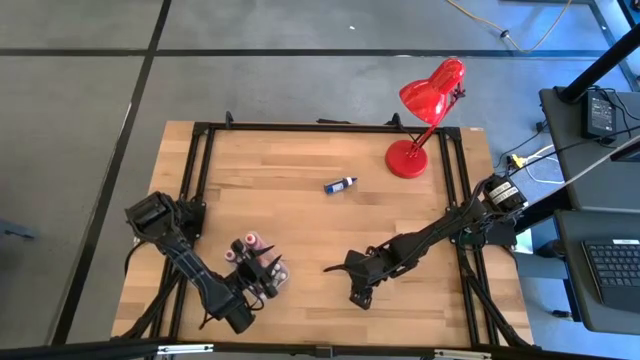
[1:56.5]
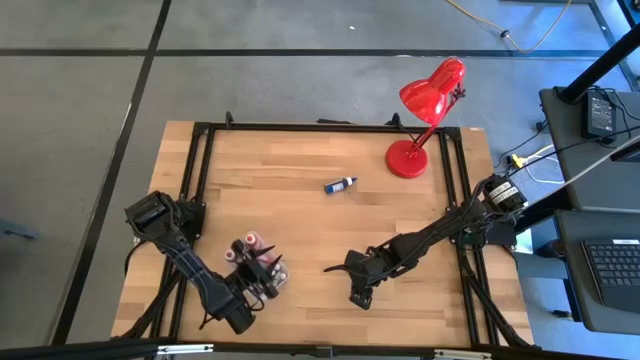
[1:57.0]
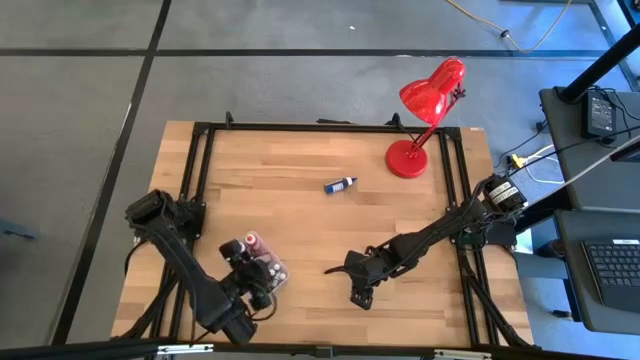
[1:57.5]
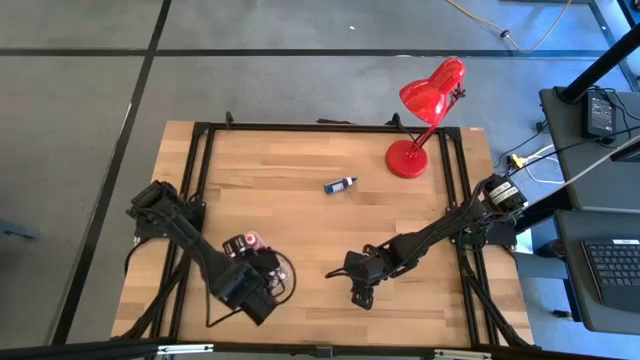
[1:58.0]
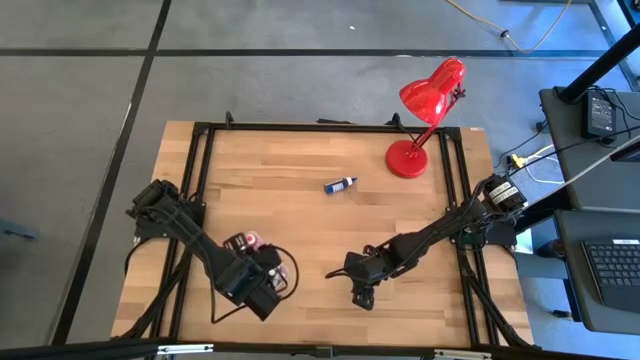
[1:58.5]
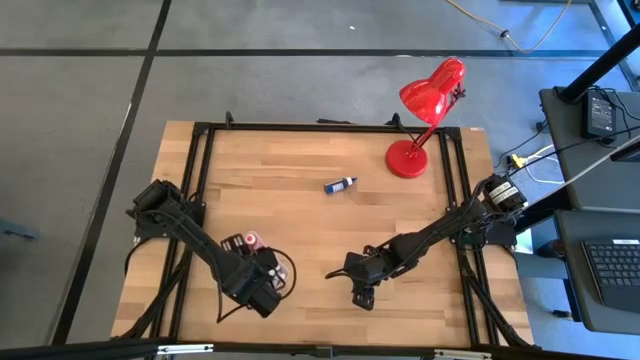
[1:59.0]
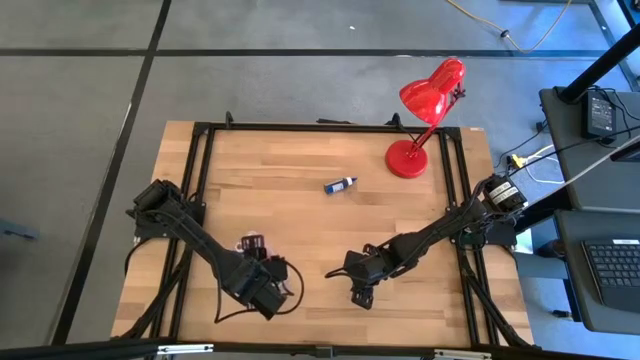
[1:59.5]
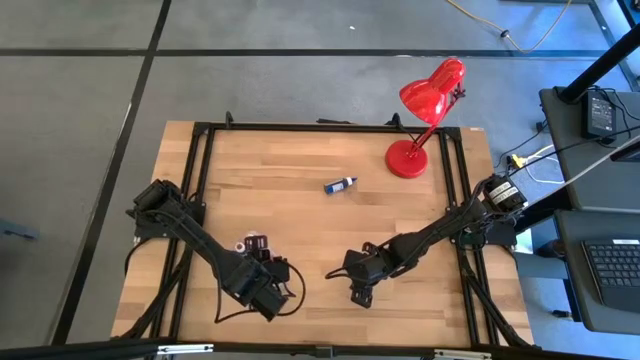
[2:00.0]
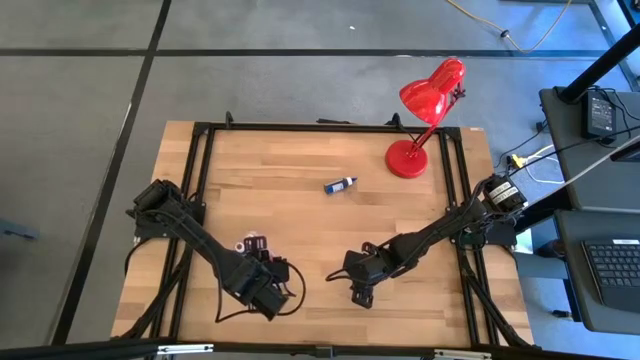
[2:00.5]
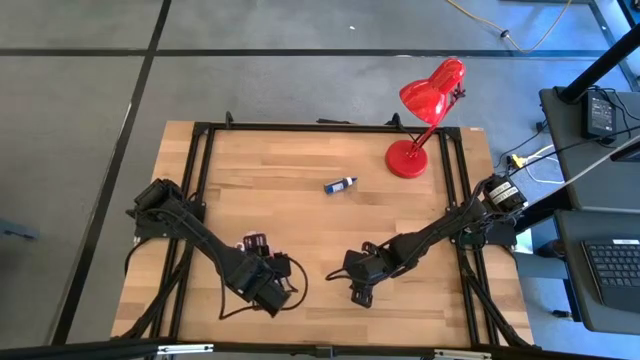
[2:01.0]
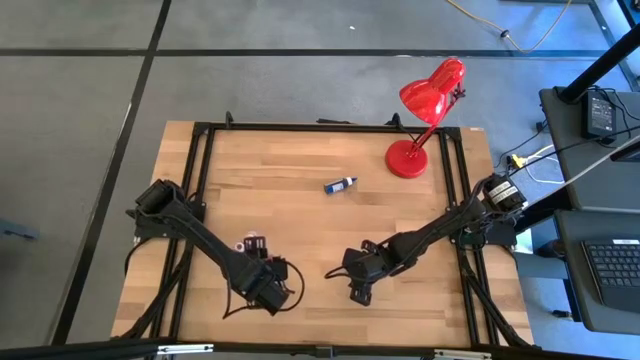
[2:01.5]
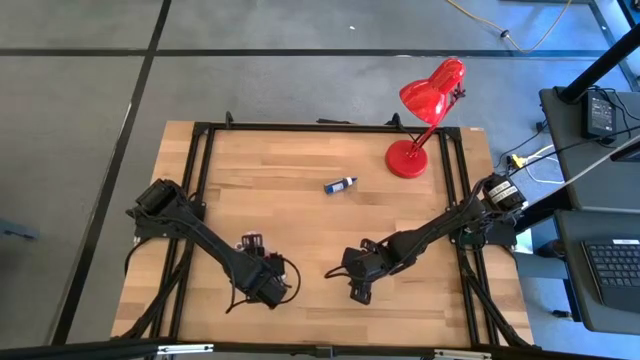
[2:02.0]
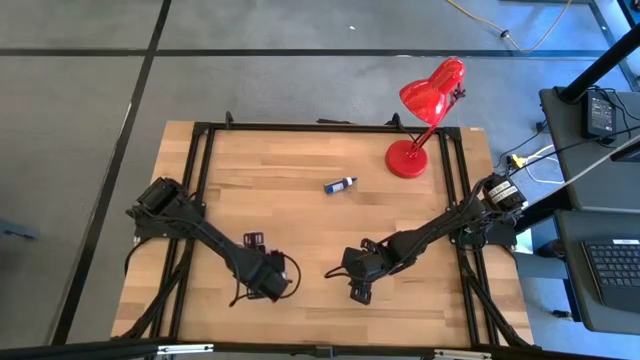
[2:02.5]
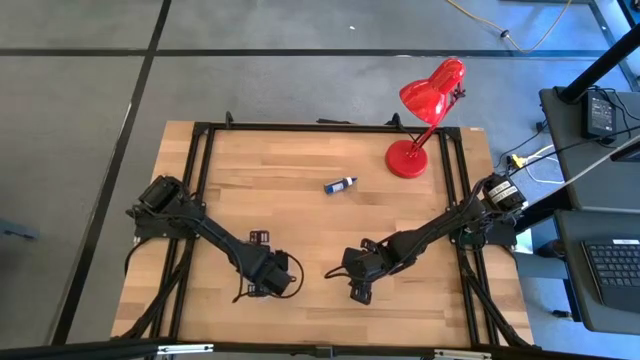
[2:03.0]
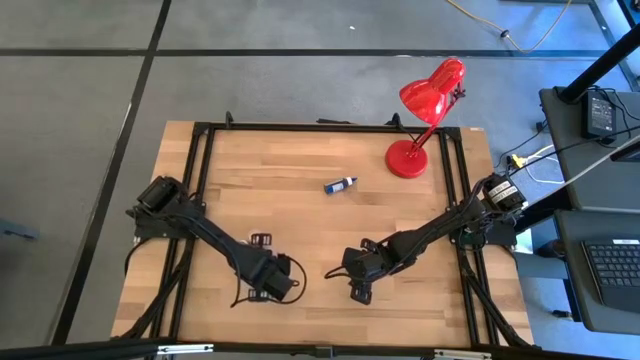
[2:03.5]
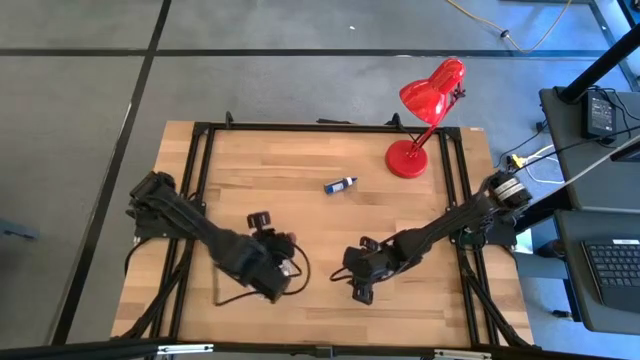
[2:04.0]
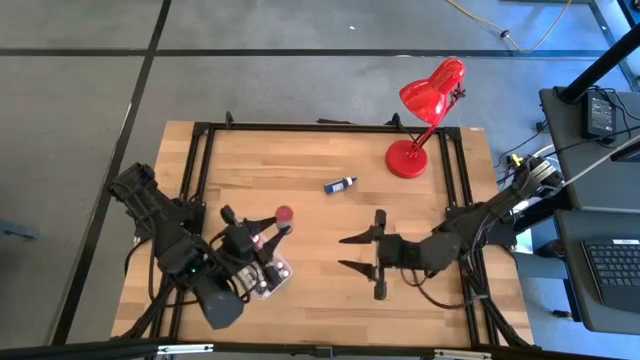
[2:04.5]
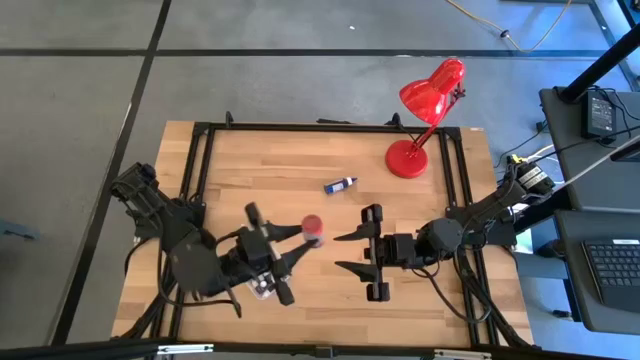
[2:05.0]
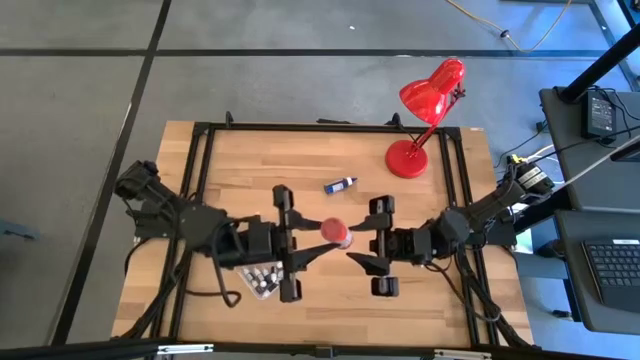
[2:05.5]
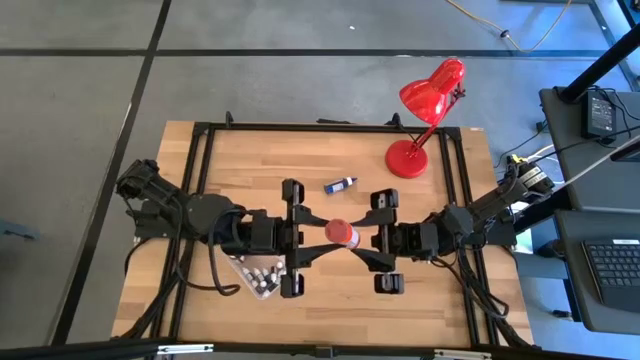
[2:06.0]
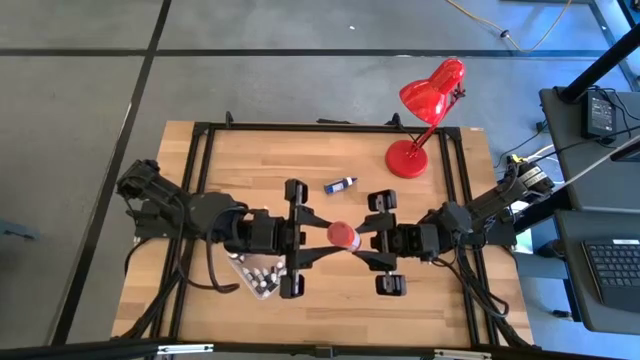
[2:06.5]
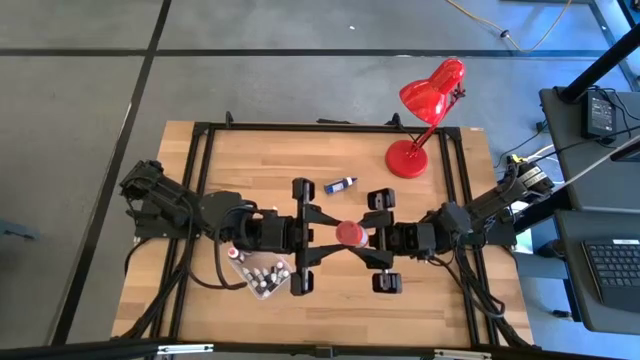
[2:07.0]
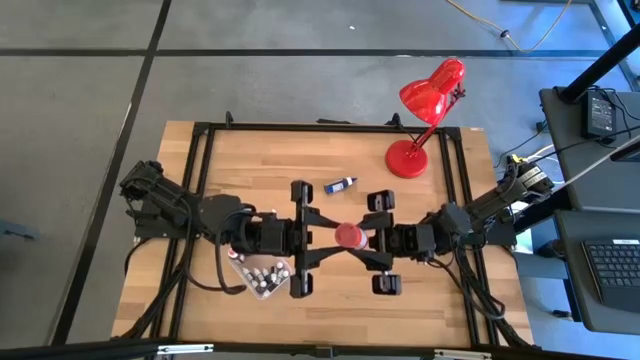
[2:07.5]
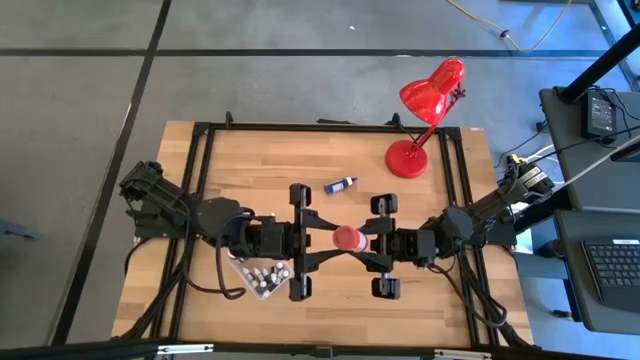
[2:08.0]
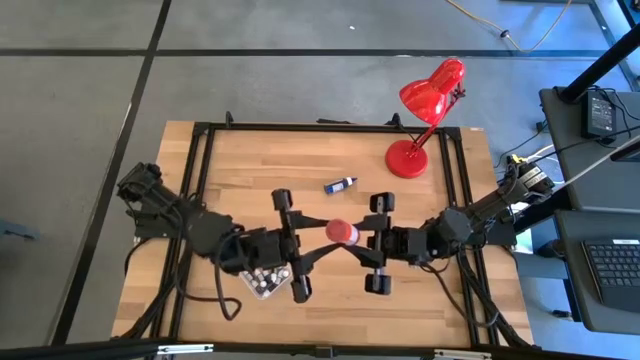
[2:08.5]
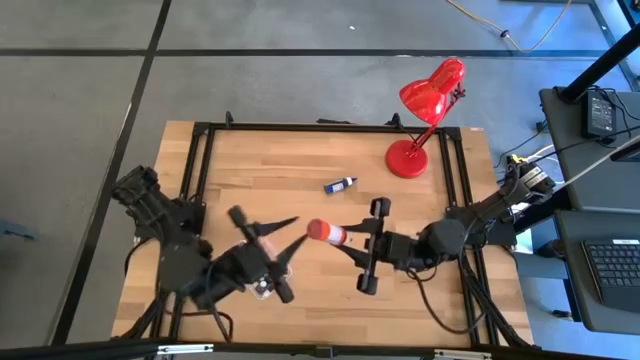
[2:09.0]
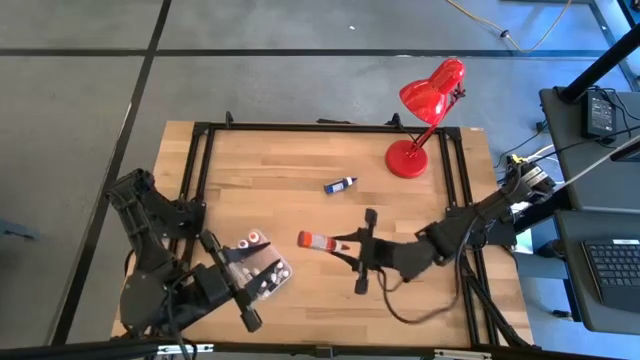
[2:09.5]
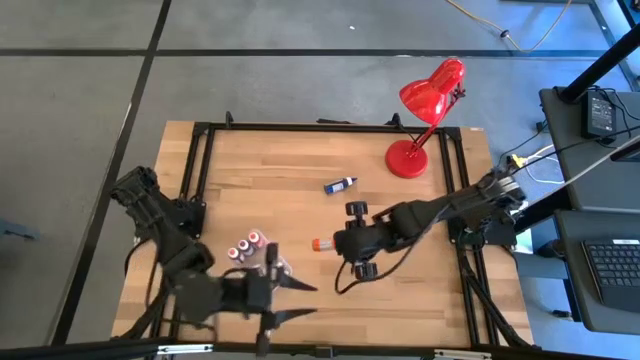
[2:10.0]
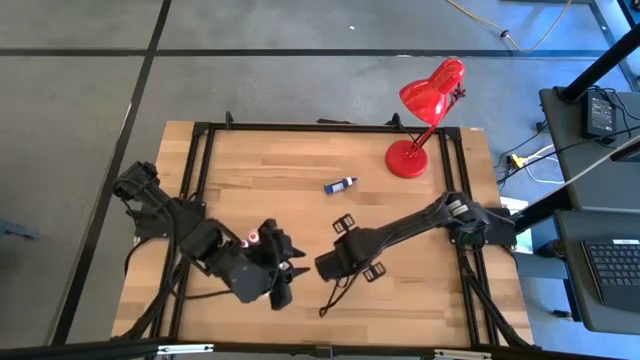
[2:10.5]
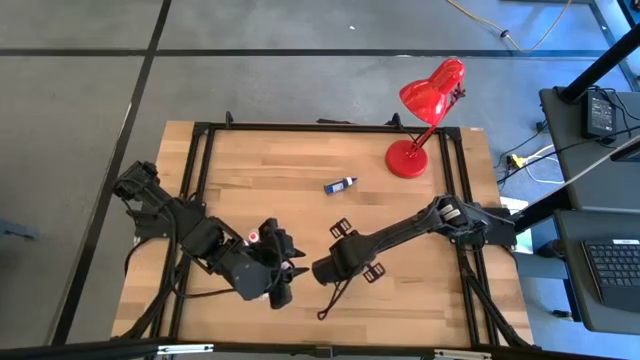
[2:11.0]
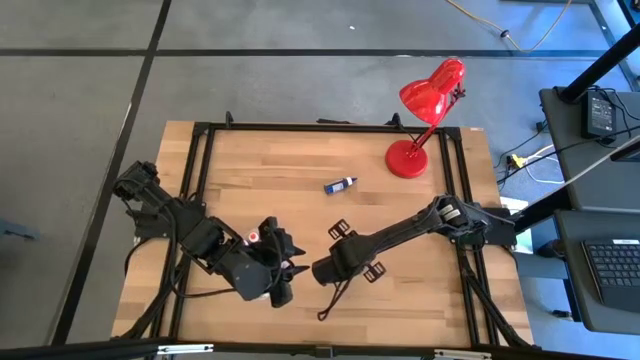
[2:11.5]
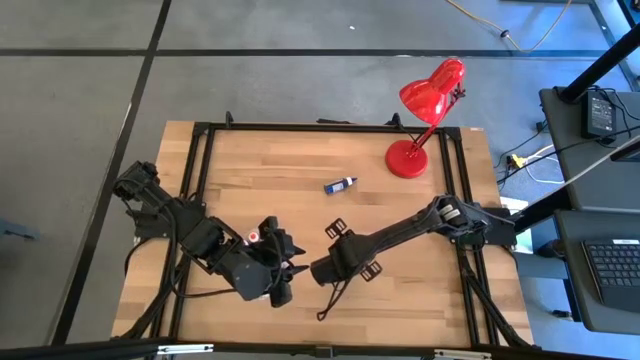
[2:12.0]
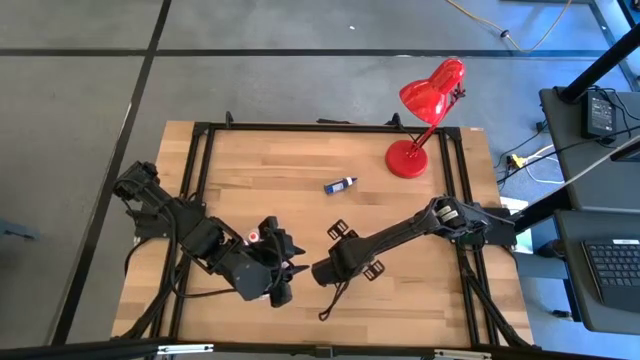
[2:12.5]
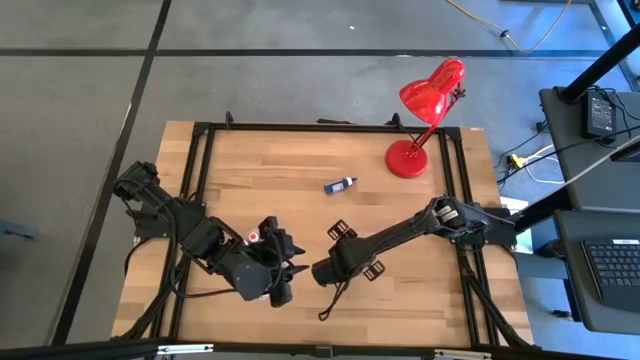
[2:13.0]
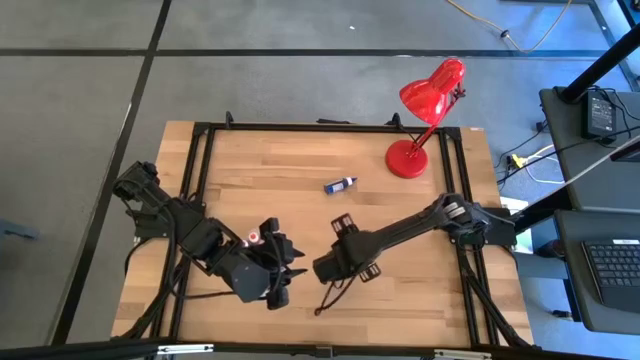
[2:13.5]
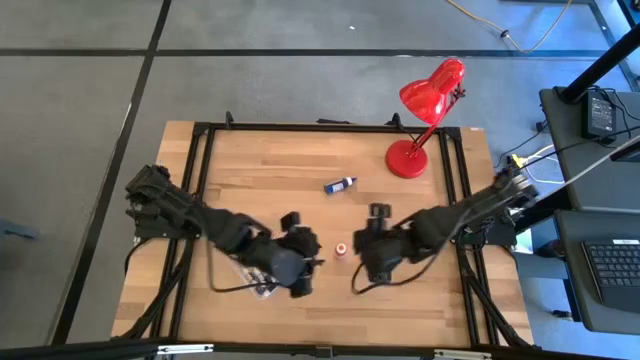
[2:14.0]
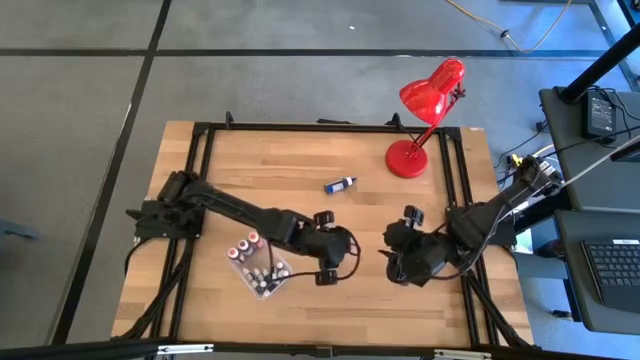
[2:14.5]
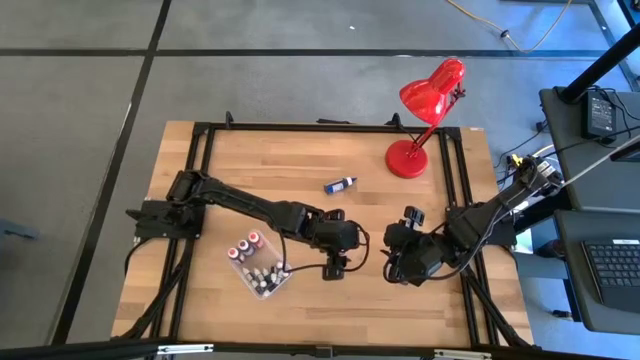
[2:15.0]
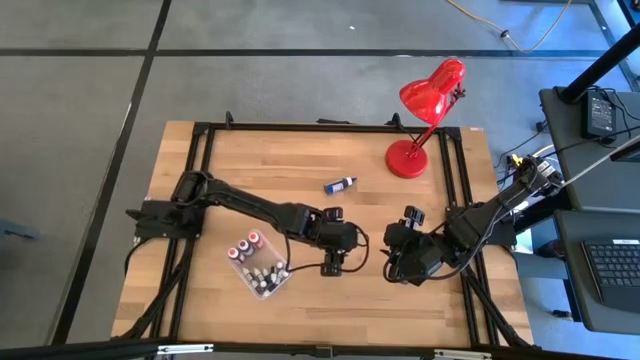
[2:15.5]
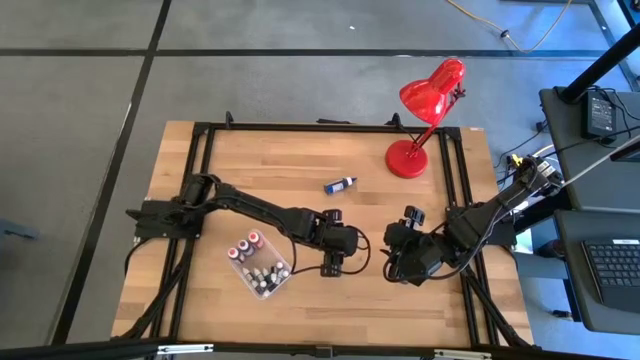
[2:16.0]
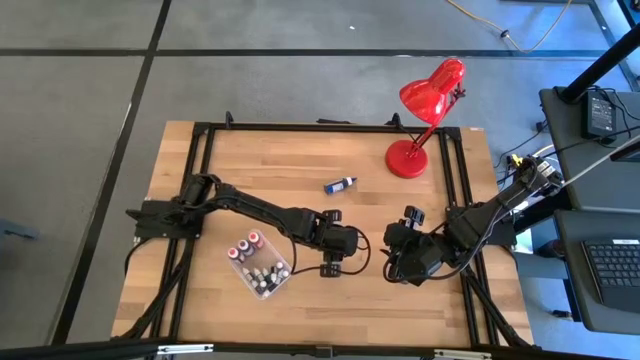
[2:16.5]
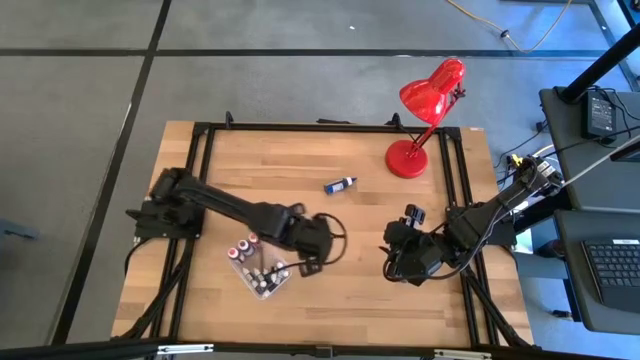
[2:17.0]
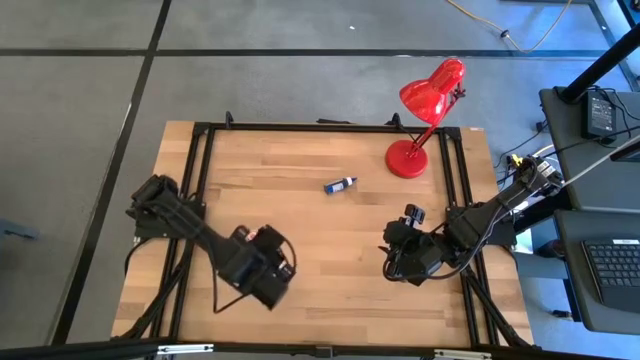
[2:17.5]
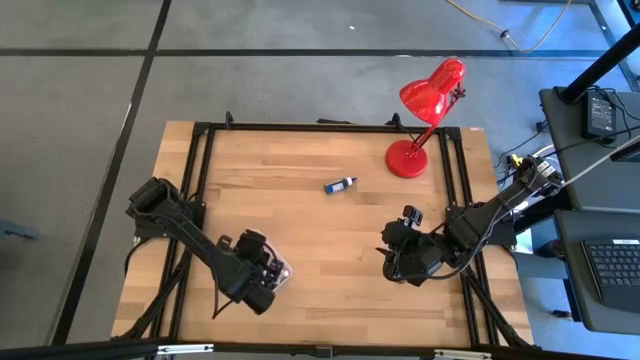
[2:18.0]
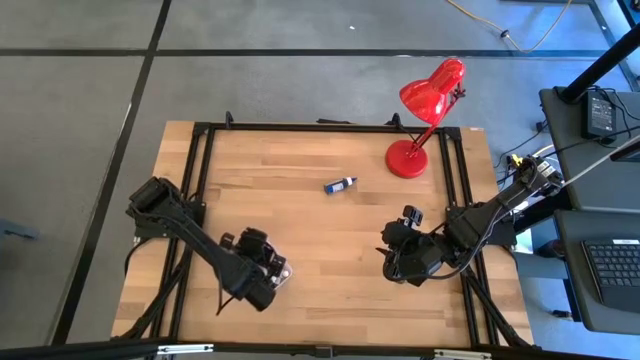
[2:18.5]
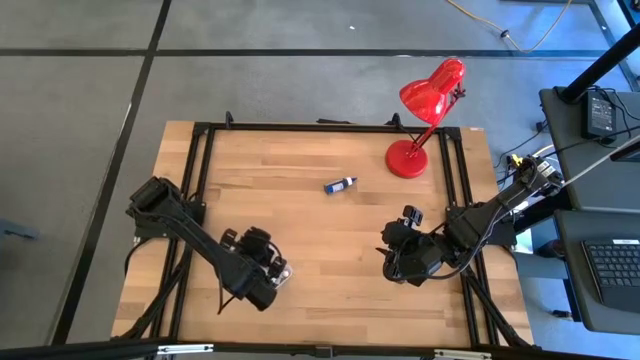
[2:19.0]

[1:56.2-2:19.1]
Task: Pick & Place food coloring
Put the orange food coloring bottle into the transparent bin
